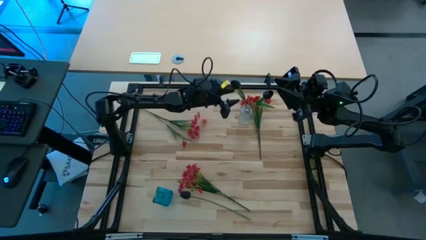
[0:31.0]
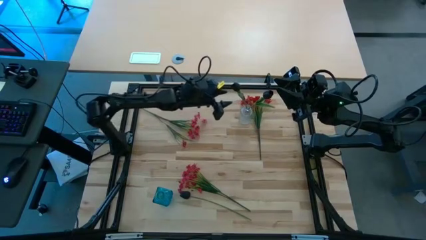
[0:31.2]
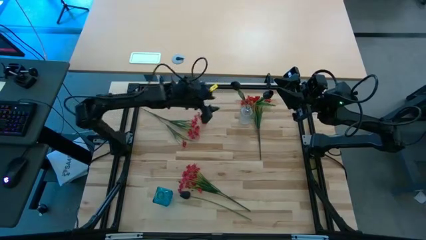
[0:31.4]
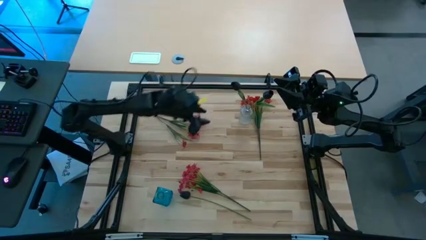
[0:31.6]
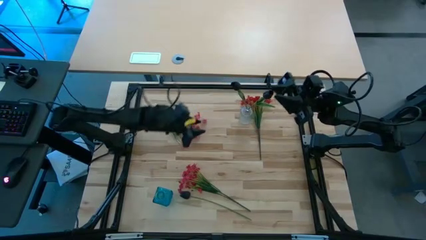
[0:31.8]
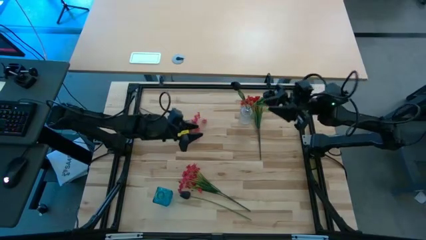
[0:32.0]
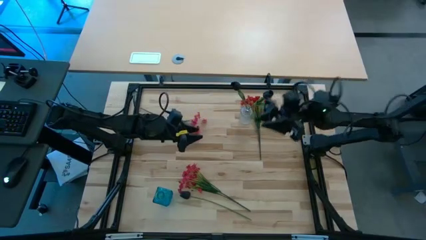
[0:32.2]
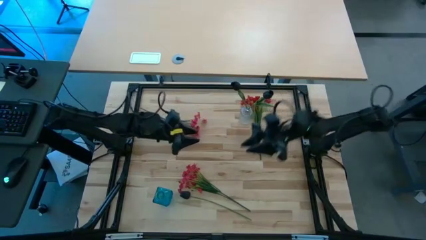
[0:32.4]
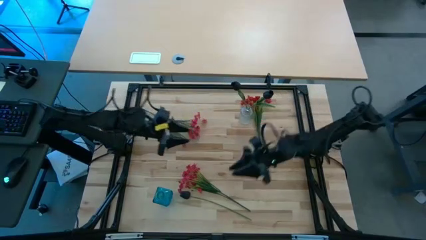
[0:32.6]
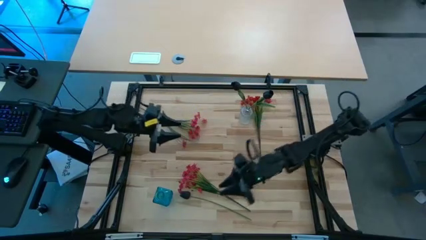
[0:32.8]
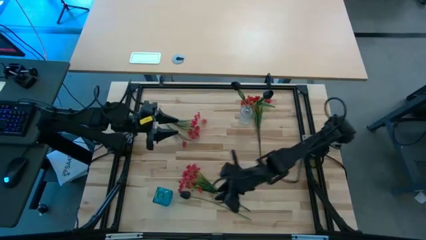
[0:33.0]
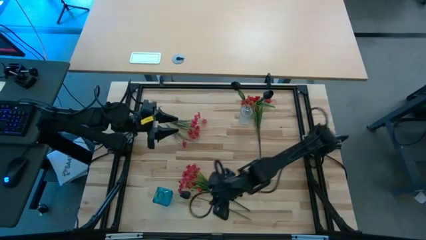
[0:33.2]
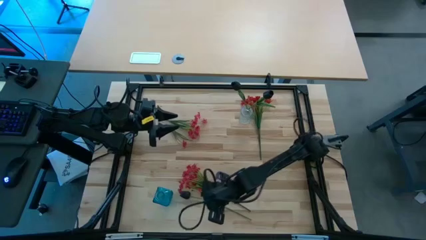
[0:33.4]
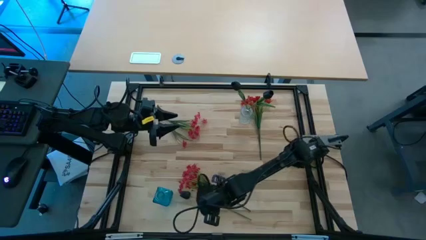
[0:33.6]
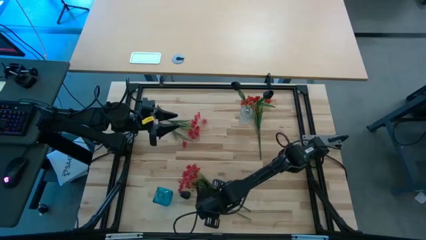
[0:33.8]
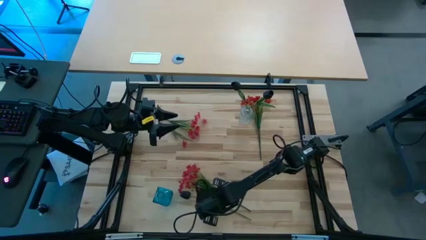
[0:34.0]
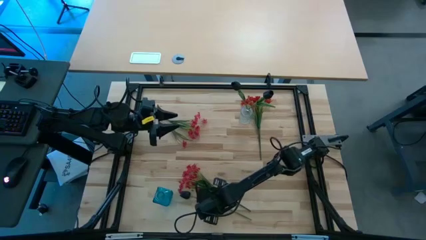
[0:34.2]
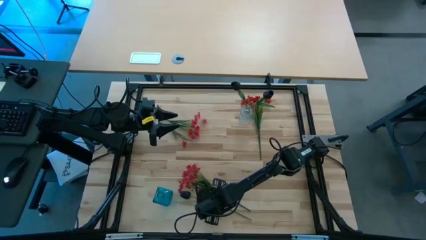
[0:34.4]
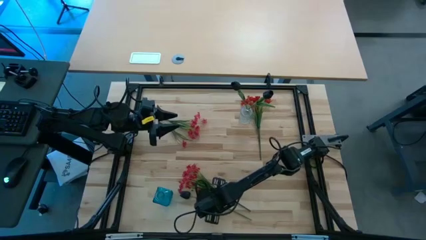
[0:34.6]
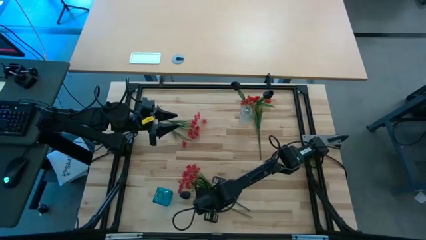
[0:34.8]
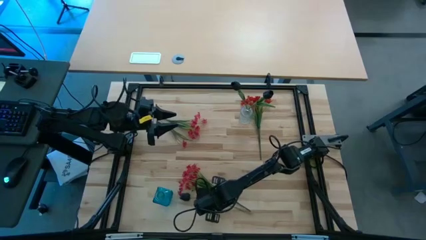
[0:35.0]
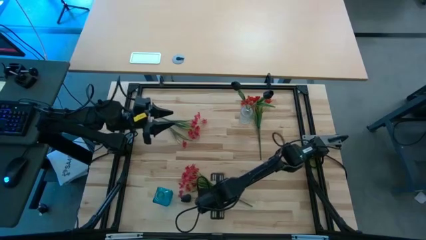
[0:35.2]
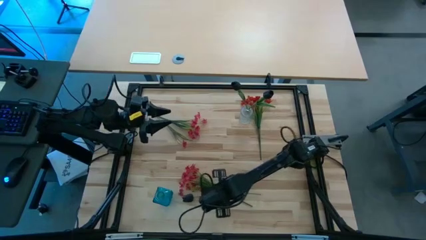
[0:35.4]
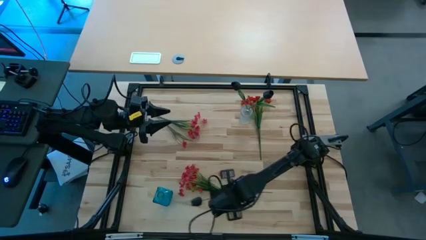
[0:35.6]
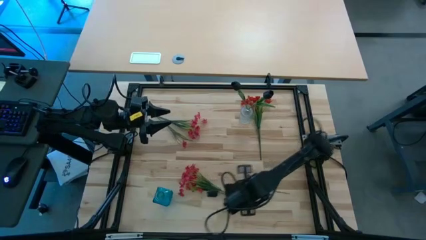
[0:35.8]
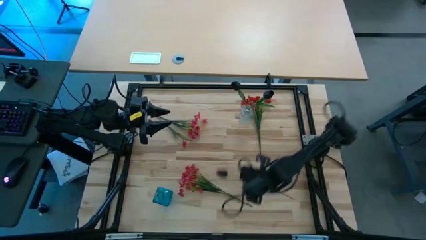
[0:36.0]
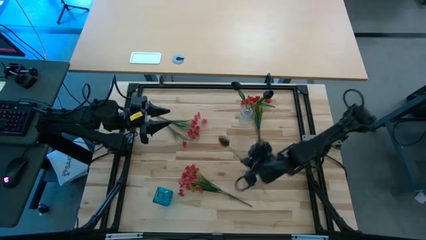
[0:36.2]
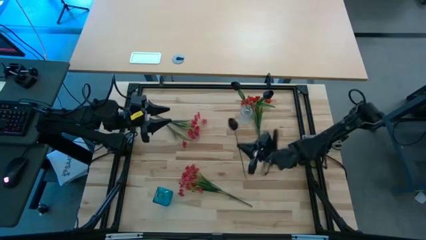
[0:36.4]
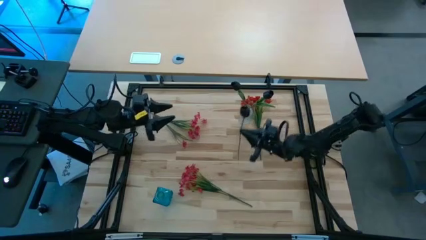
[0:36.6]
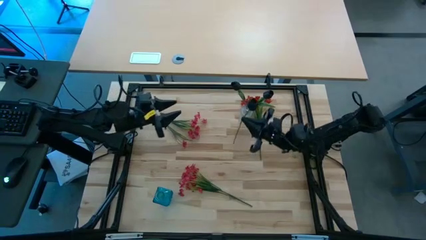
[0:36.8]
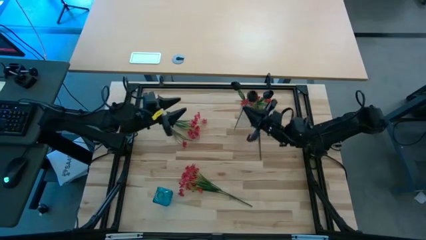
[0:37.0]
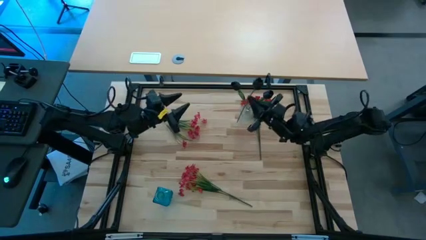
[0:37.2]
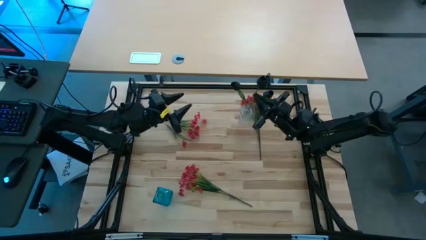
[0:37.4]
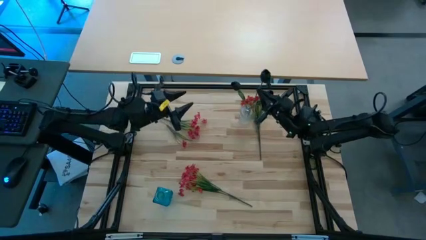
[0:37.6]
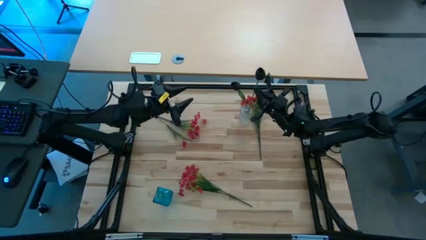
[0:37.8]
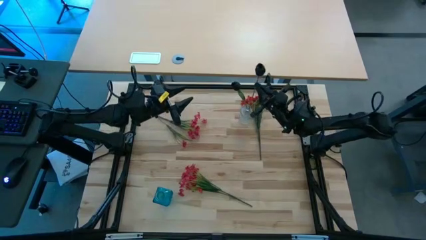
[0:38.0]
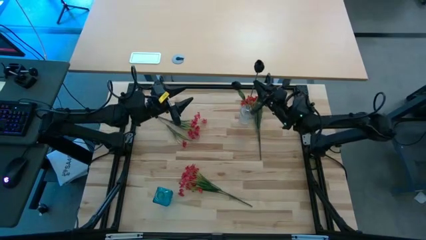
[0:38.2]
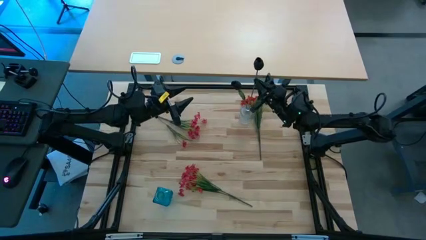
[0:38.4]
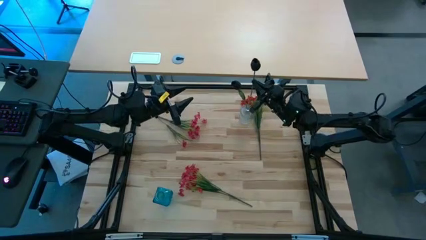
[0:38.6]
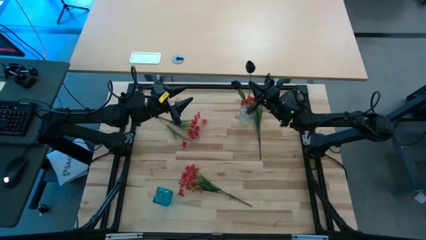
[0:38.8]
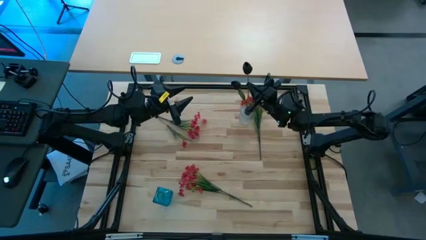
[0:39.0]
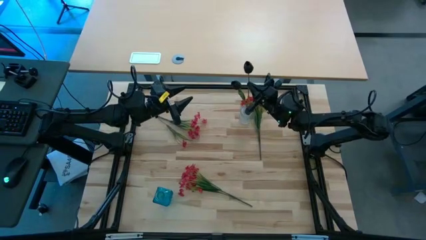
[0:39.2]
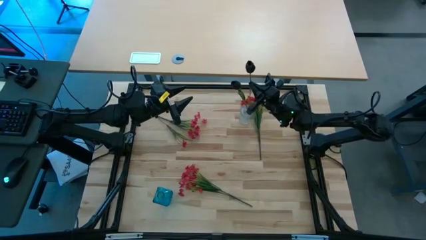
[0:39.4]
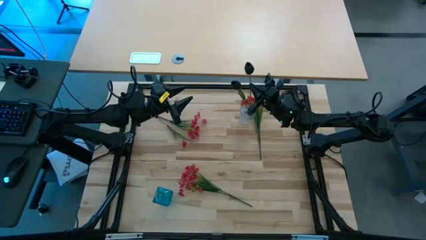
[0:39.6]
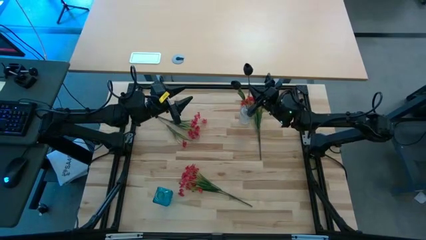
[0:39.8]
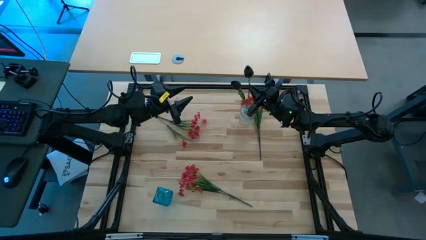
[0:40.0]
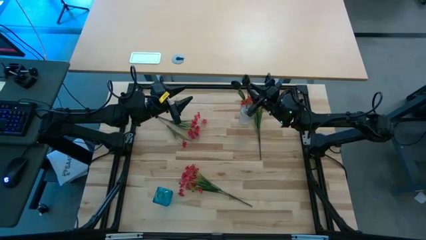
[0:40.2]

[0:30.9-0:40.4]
Task: Sort flowers into vase by color
Put the black tulip into the transparent vase

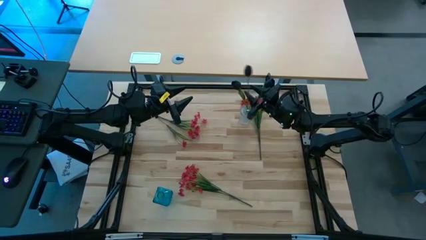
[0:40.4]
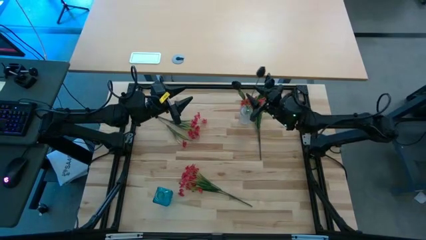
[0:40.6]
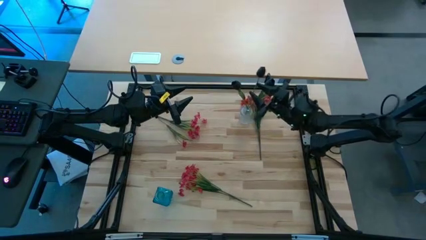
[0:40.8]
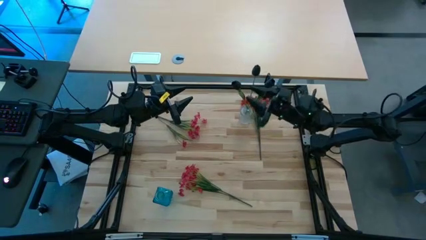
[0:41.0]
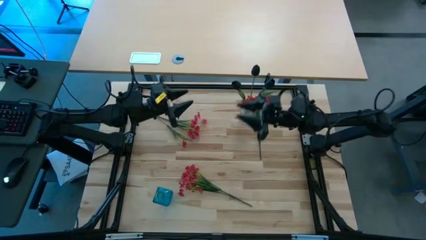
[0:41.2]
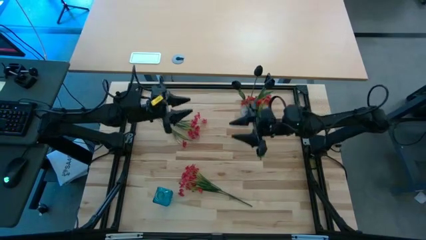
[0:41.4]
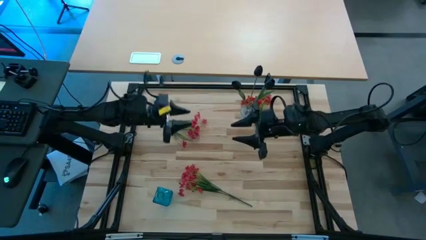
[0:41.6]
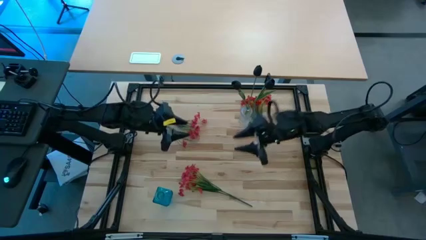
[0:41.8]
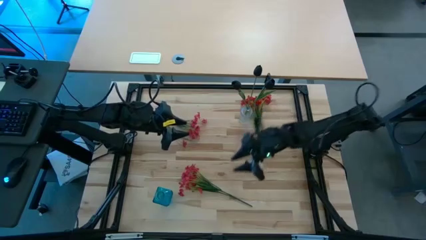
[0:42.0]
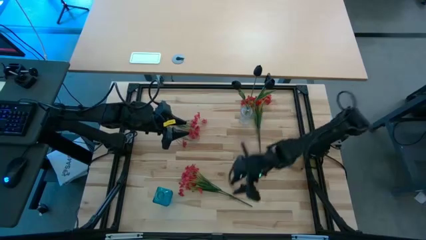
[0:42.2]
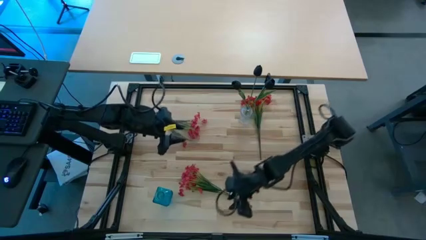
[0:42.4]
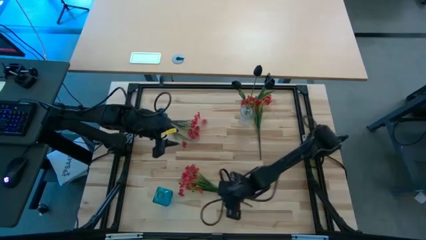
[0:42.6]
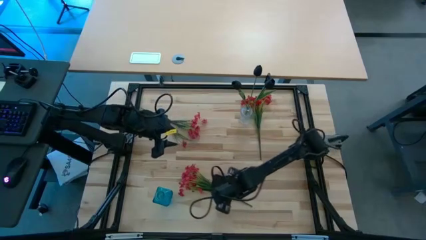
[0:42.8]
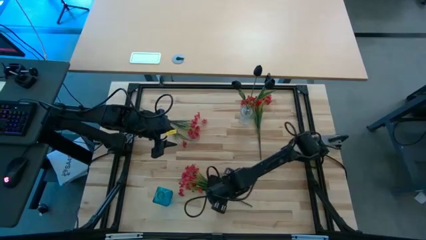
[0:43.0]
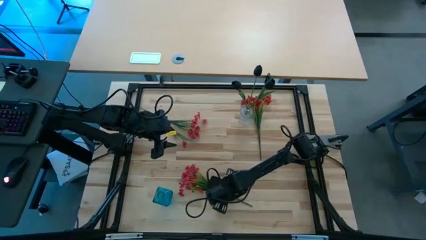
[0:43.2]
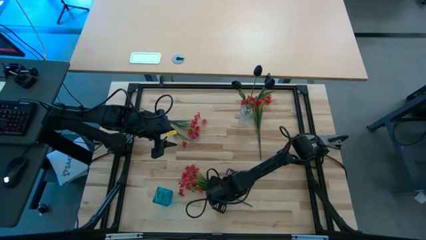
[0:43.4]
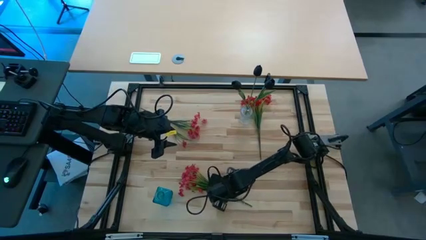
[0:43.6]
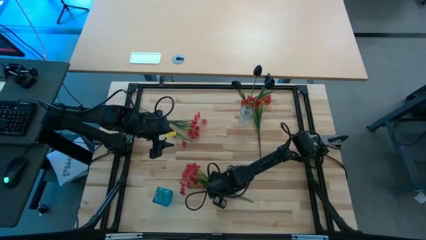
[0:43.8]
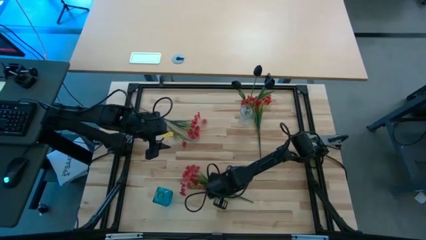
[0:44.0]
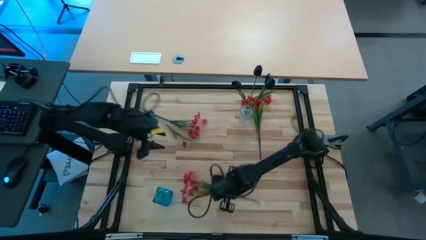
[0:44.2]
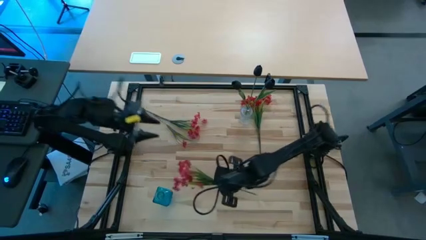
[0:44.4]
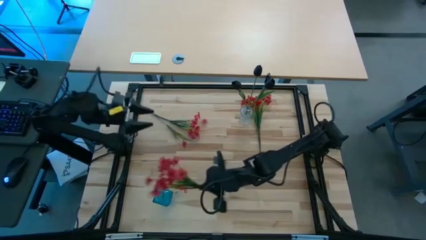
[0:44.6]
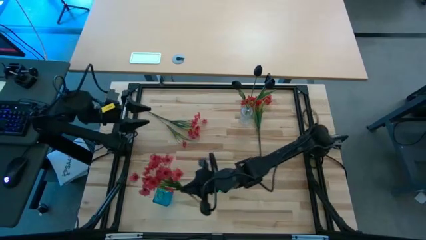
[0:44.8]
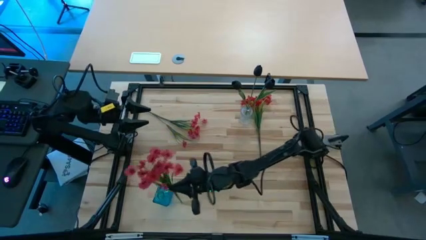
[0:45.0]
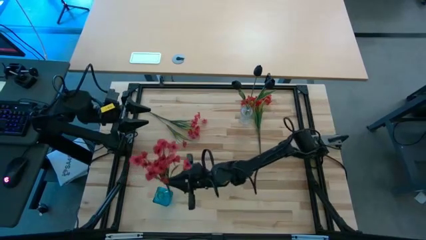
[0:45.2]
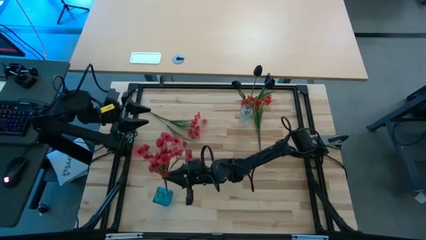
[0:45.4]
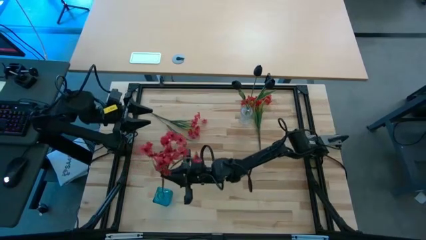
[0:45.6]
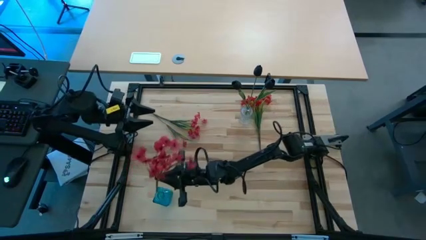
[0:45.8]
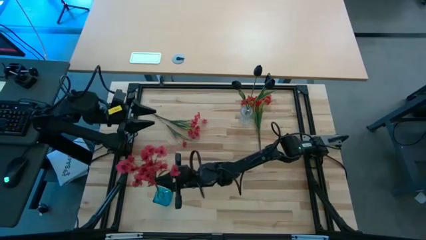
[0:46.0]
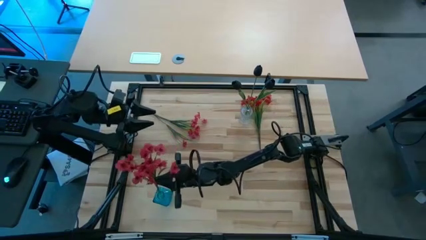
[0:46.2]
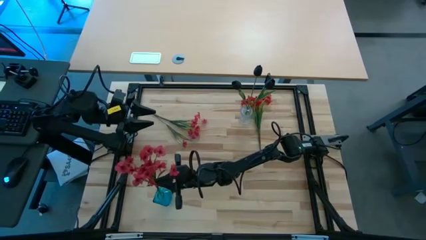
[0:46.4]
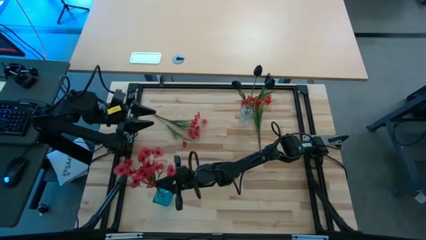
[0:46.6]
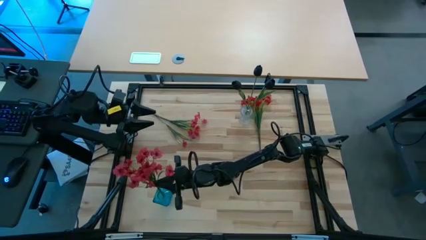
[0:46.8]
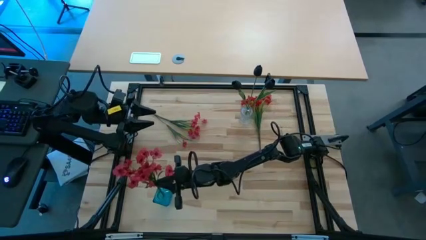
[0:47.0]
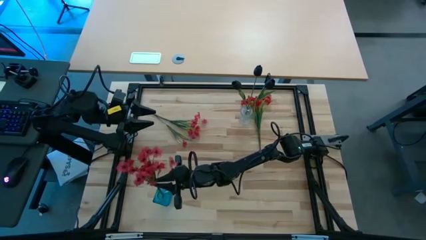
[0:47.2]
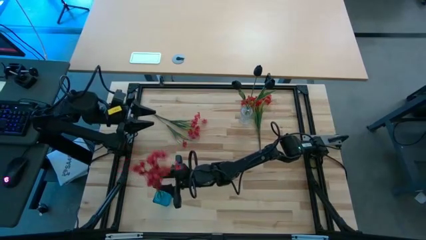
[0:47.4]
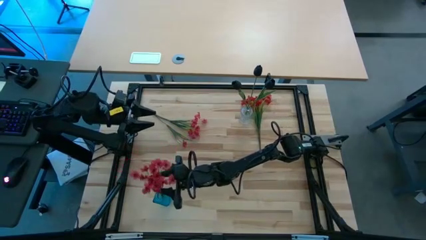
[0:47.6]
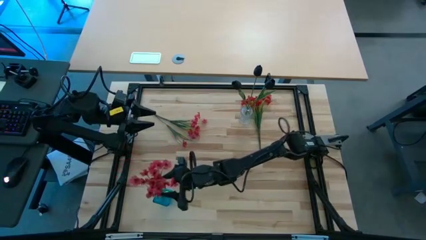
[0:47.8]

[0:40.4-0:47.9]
Put the bottom red flowers into the blue vase
